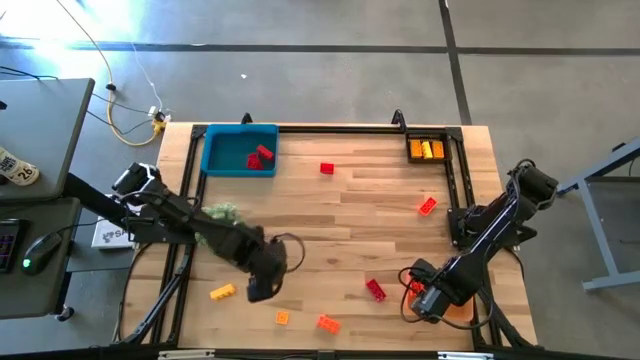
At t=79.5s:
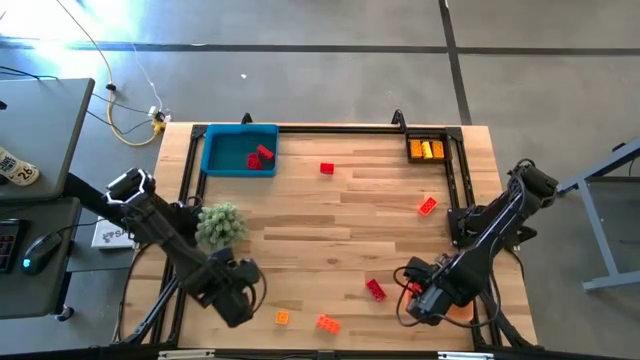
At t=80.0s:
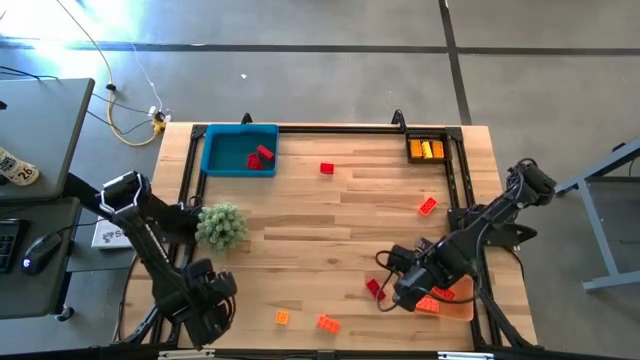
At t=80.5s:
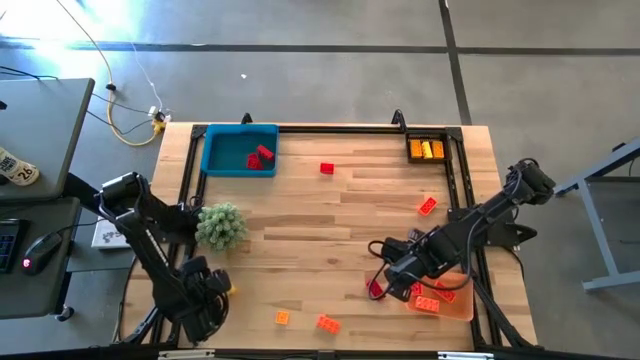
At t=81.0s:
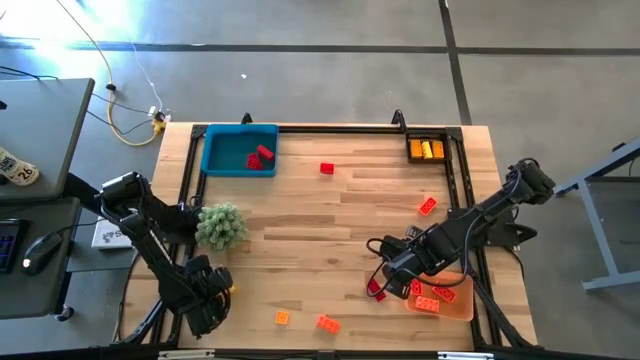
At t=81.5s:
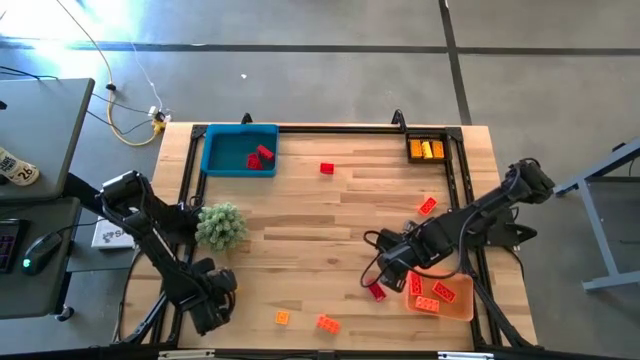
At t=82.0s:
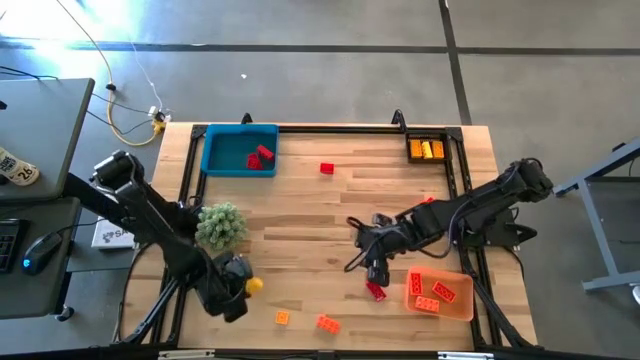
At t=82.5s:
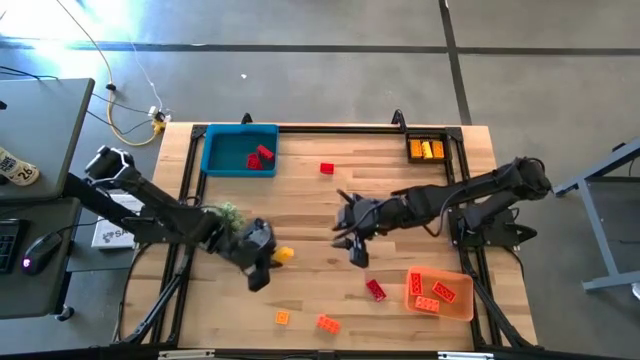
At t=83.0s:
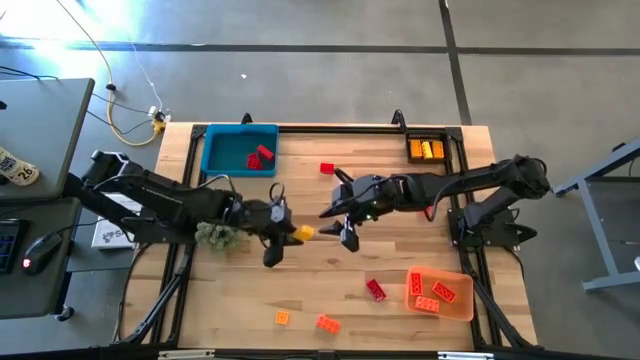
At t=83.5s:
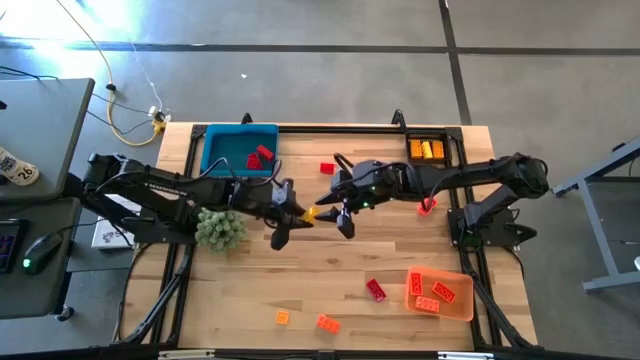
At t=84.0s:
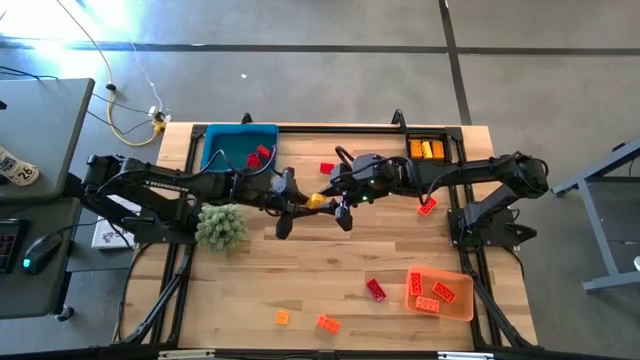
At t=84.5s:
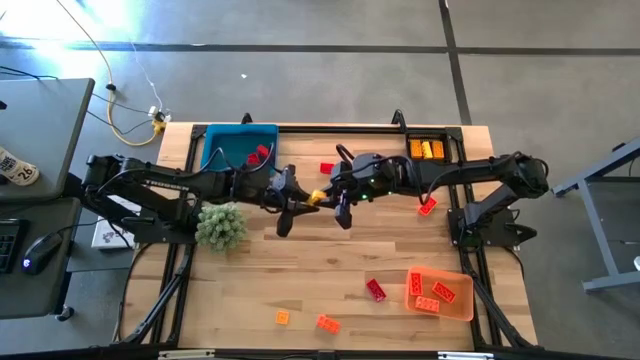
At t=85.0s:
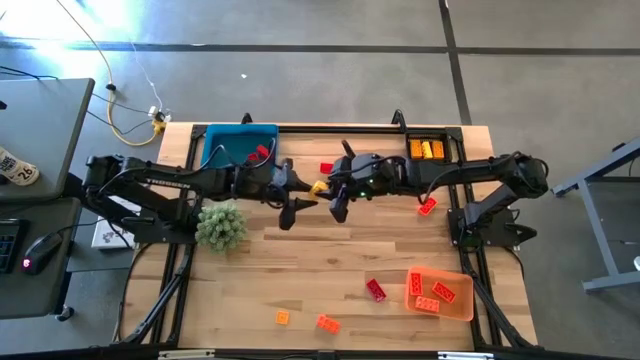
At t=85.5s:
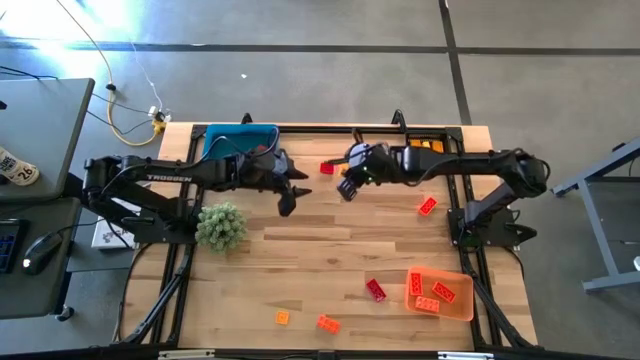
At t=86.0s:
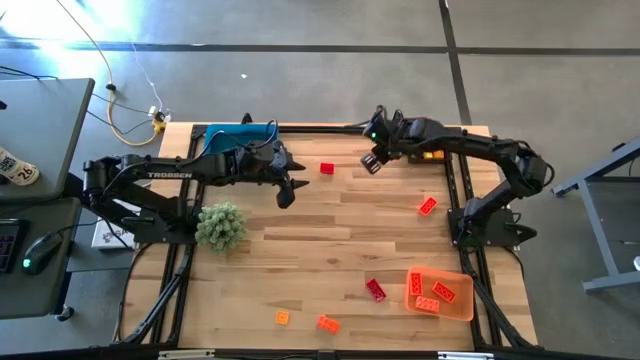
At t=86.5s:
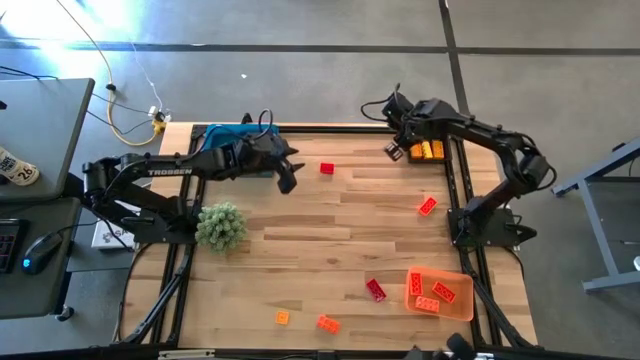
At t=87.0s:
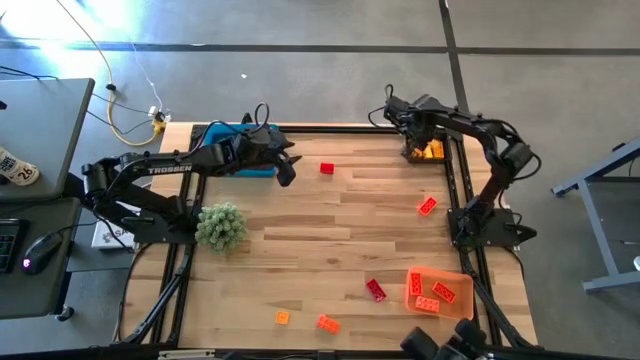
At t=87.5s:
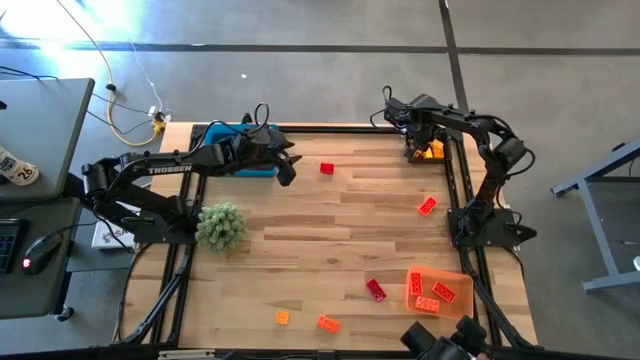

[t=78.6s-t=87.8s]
Task: Sort & place blocks by color
Put the yellow game piece into the black bin

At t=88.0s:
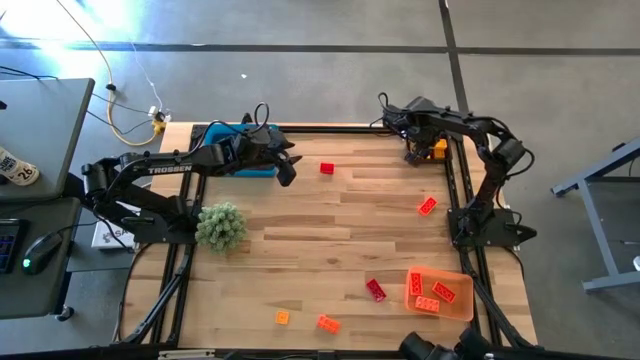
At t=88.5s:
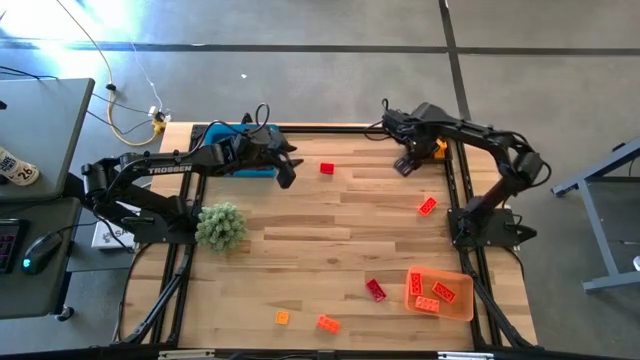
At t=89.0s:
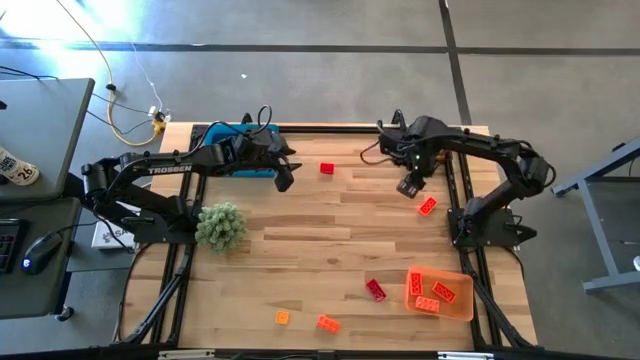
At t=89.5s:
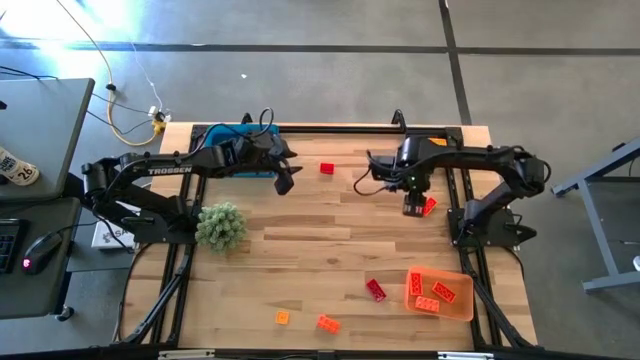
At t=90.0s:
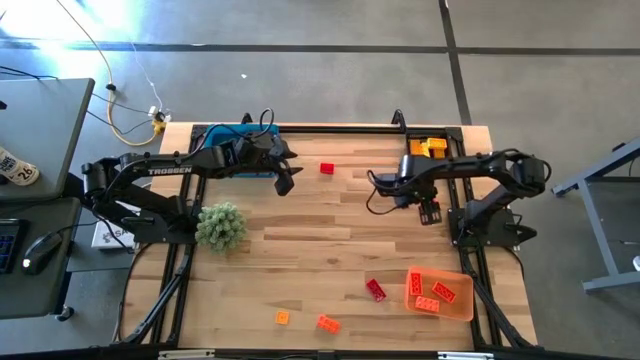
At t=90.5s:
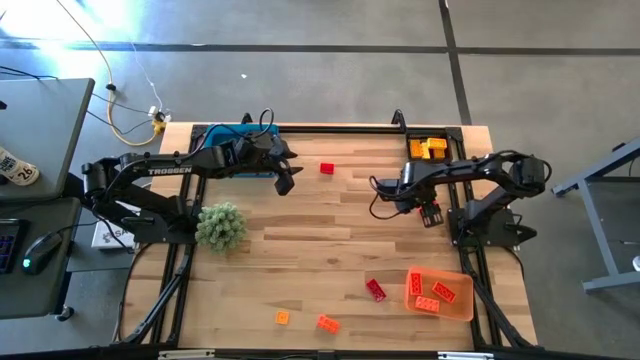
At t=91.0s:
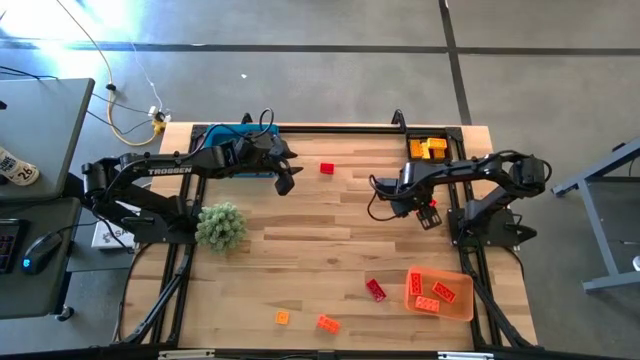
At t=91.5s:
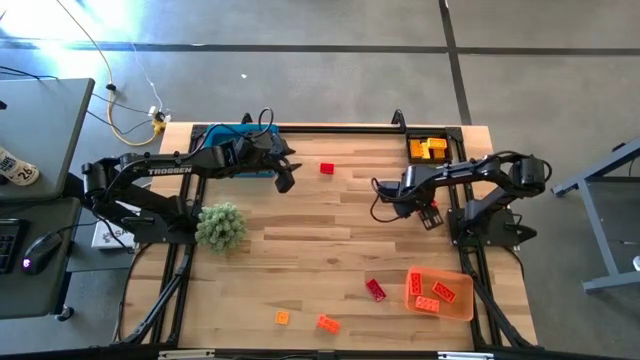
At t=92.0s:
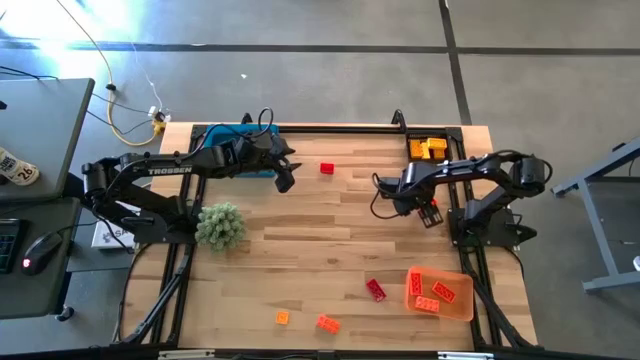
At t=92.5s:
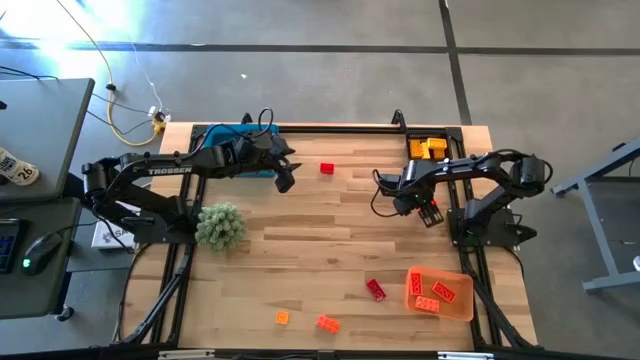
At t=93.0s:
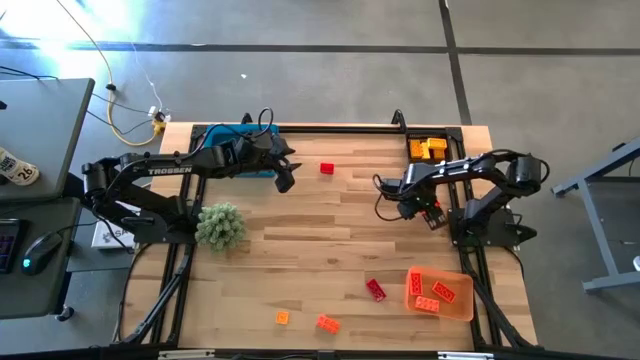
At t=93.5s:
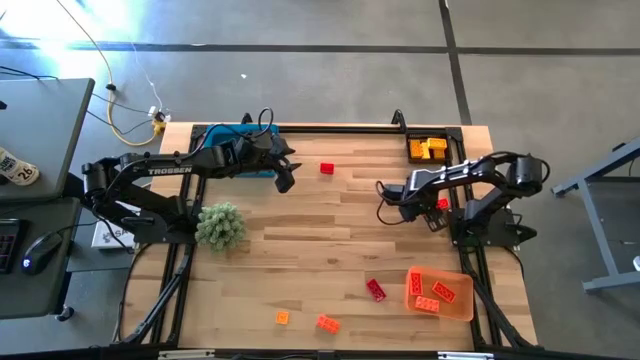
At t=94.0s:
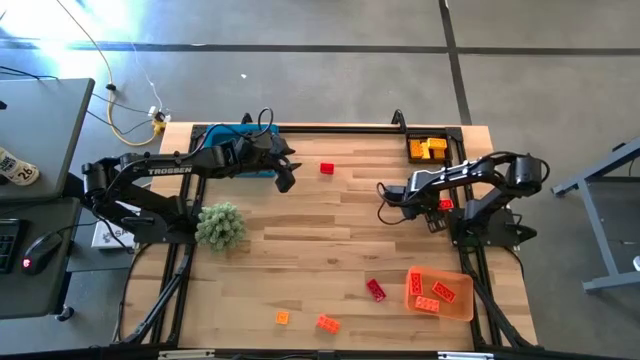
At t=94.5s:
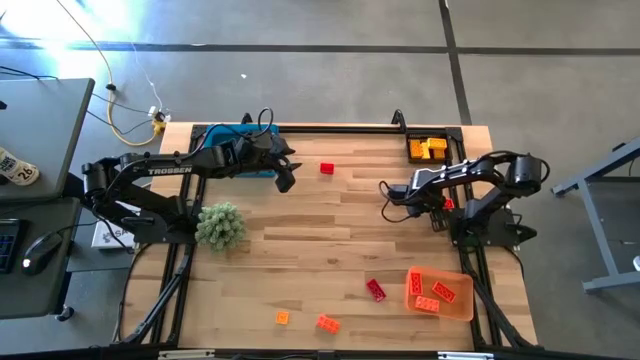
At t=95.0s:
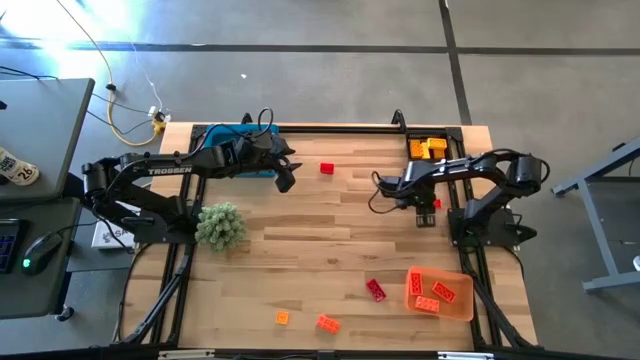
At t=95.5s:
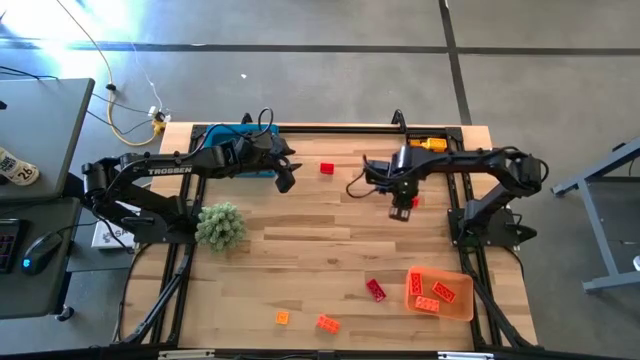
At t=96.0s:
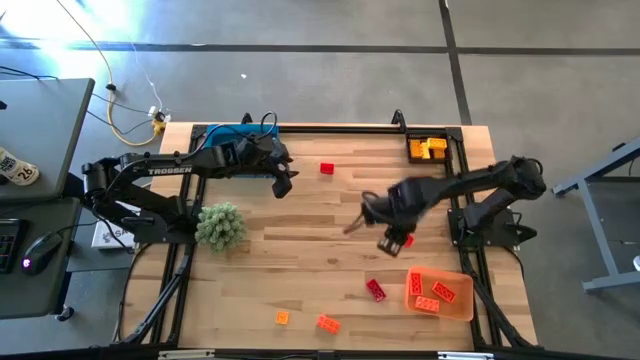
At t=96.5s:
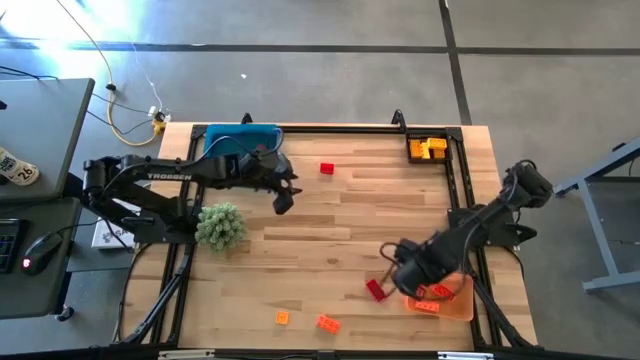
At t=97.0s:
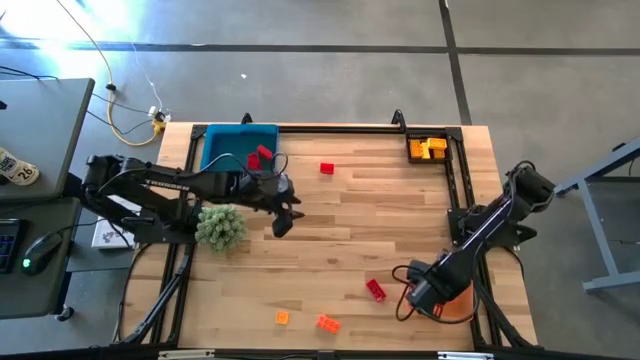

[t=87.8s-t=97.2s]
Put the orange game piece into the orange bin

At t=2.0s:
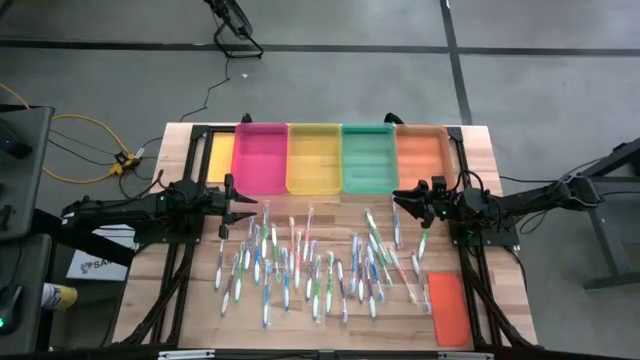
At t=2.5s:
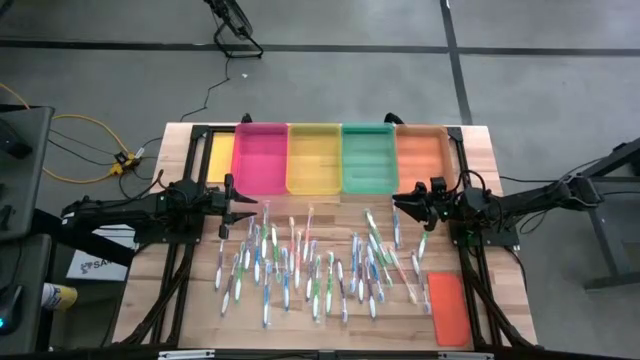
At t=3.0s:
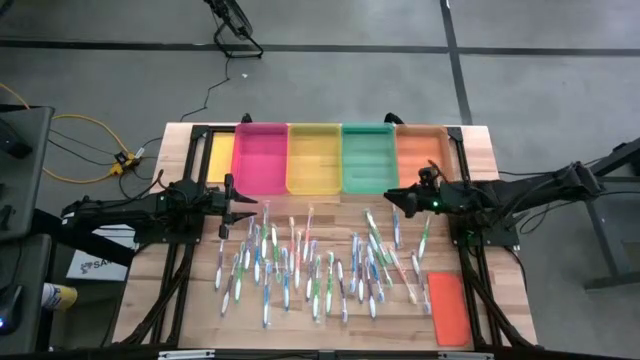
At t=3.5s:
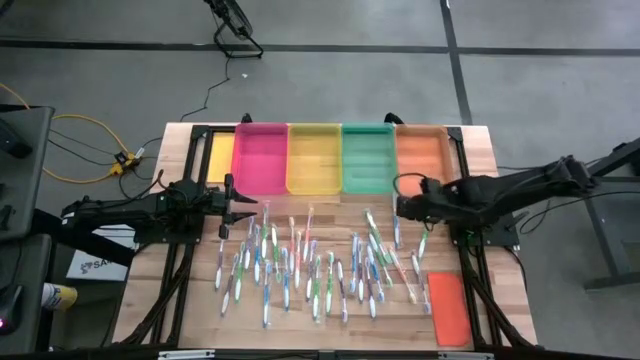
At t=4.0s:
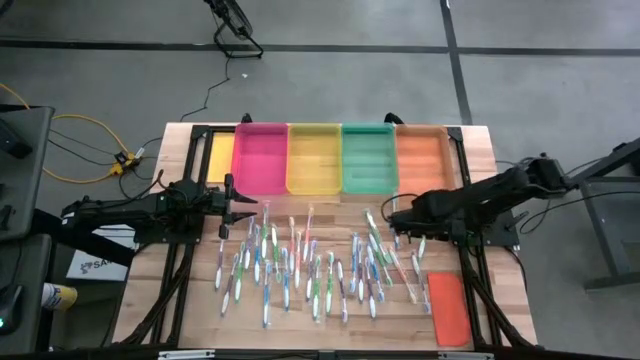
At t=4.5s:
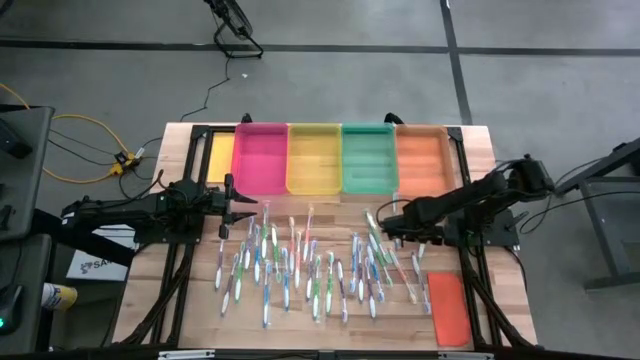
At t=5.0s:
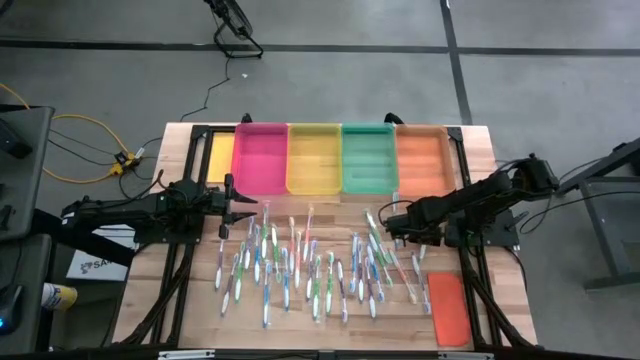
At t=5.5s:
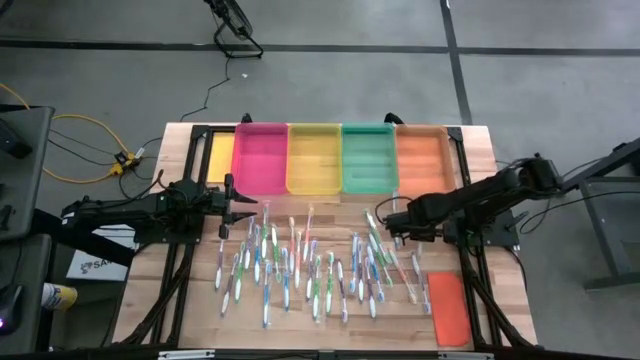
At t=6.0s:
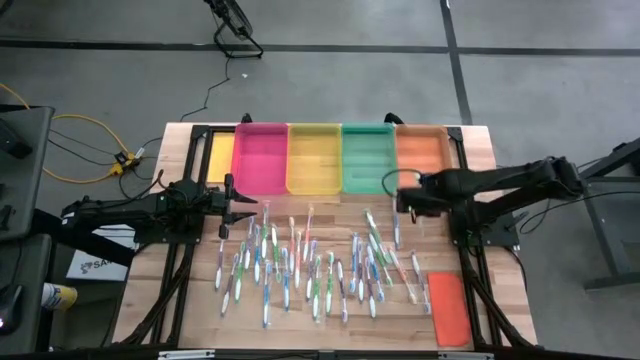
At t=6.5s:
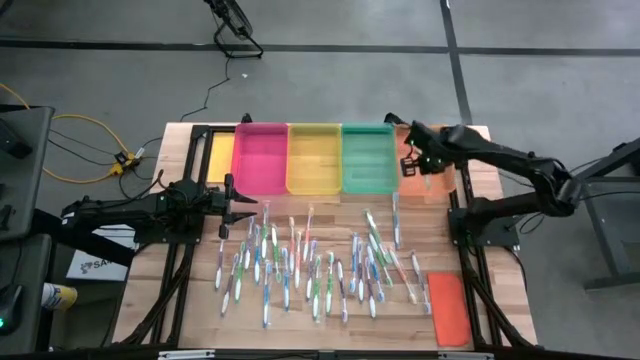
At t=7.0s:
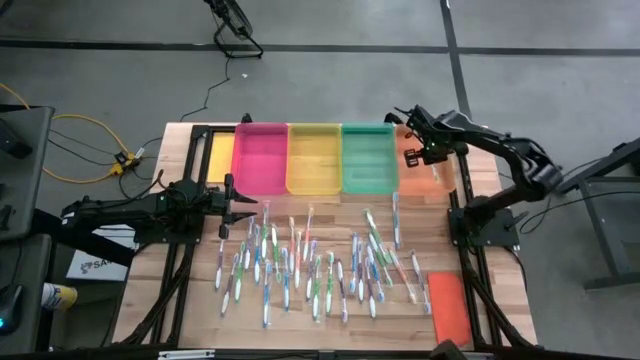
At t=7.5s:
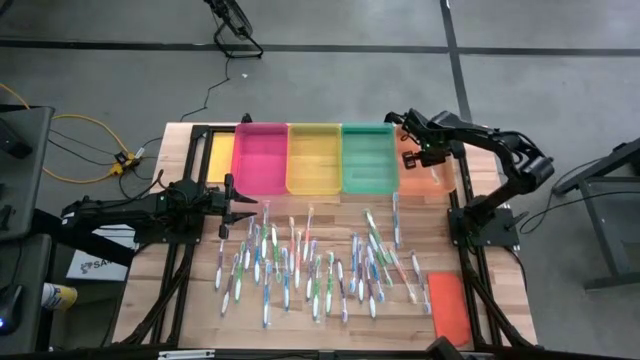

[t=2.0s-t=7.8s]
Task: Pick & Place Toothbrushes
Put the green toothbrush into the orange bin
